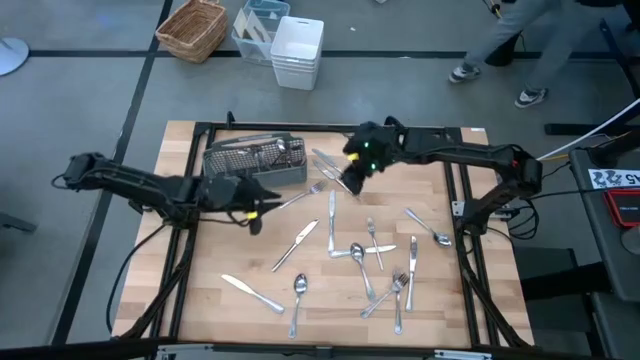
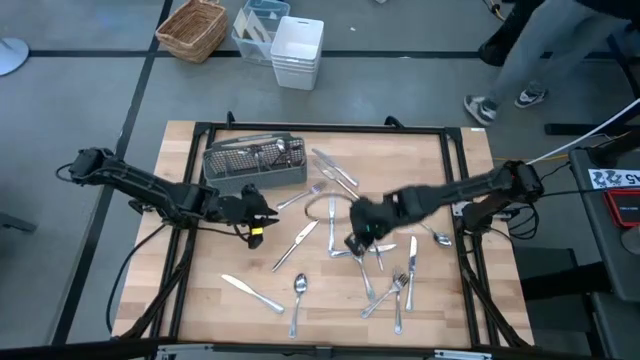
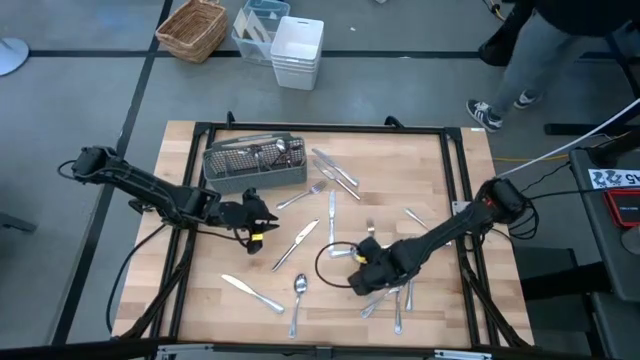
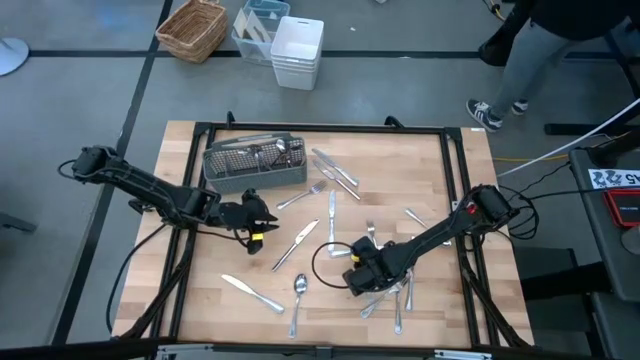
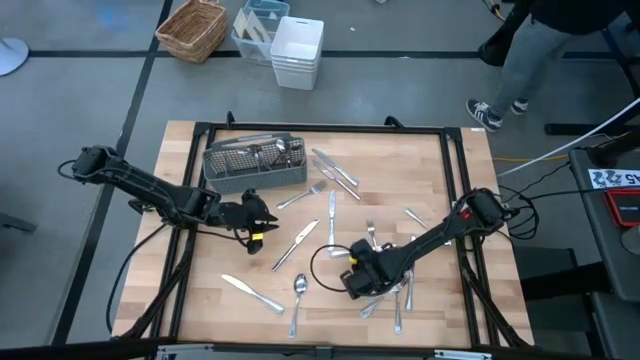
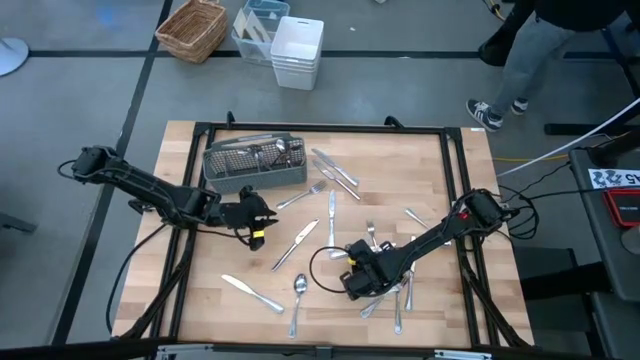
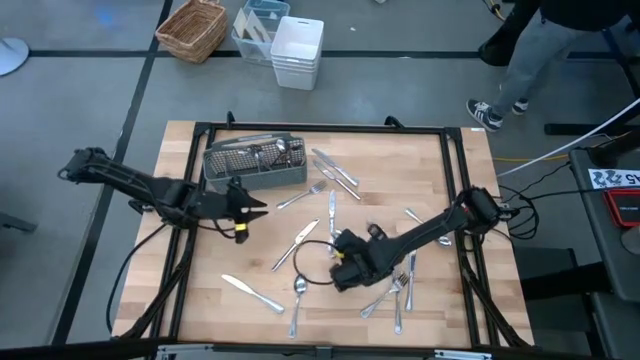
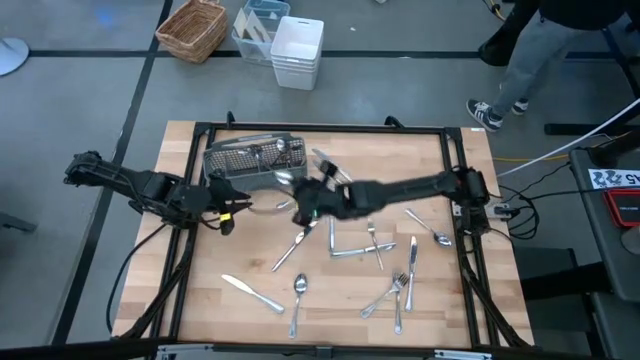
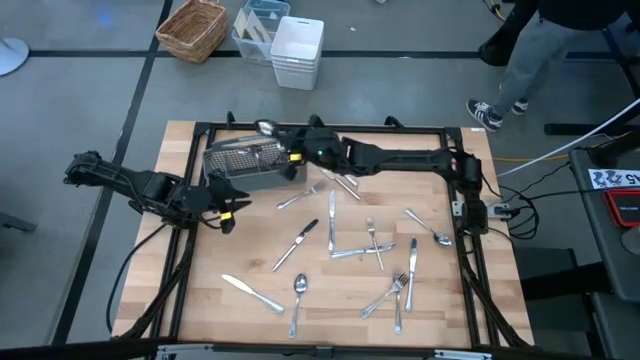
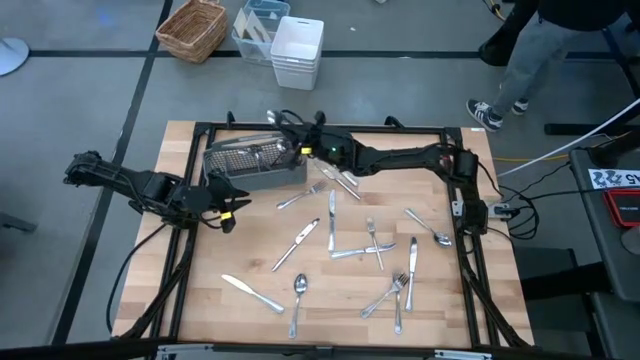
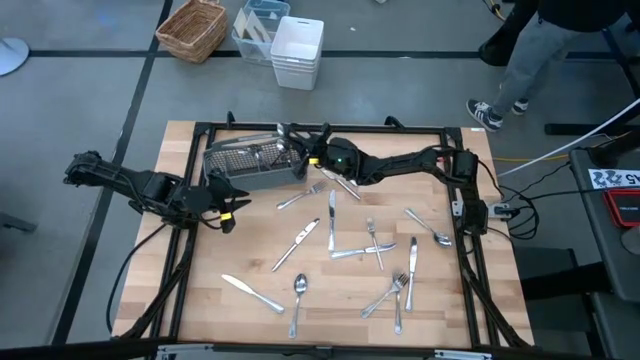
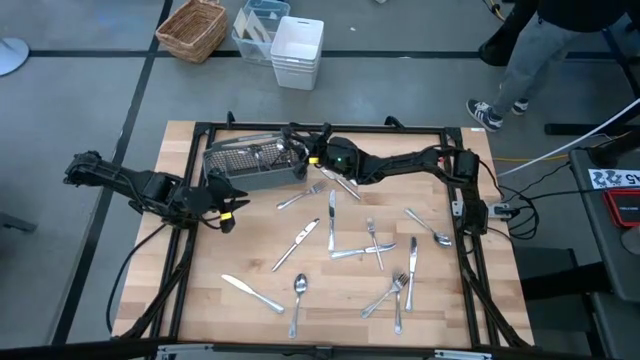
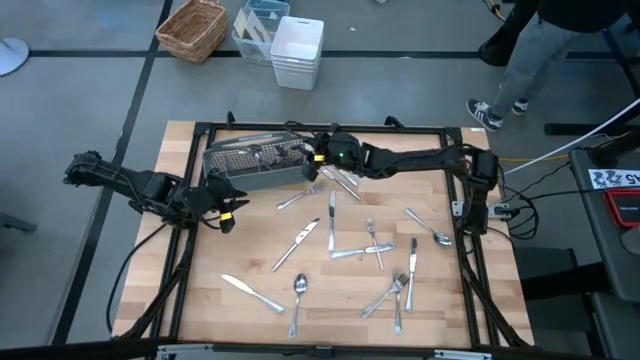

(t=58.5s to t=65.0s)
Task: Sort silverware
Put the silver spoon into the silverware rack

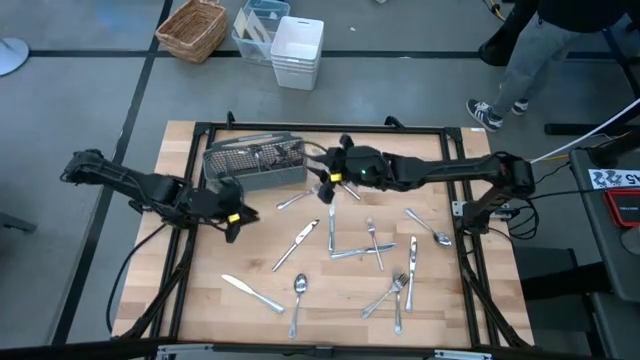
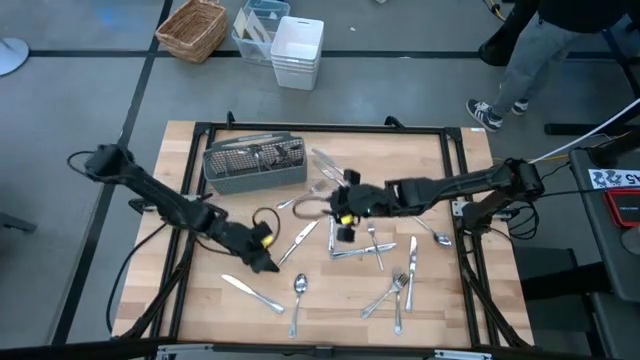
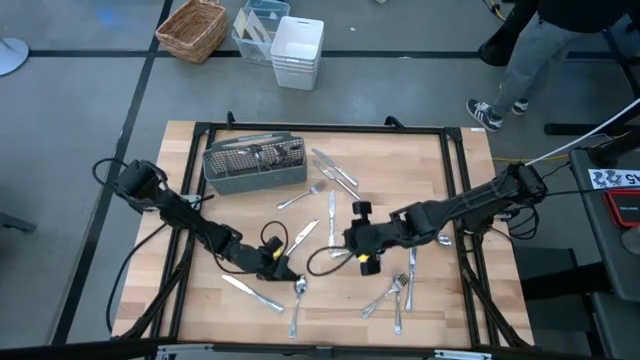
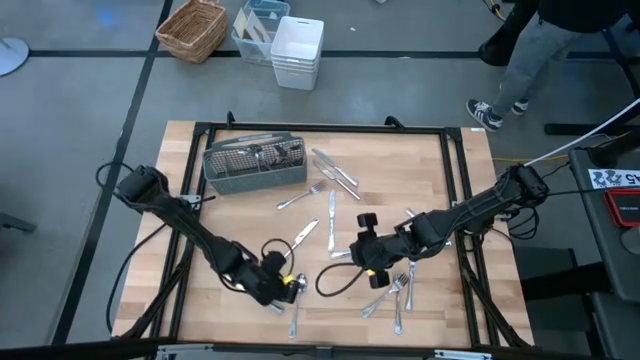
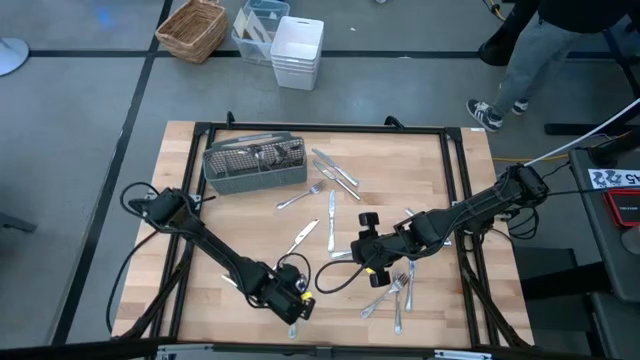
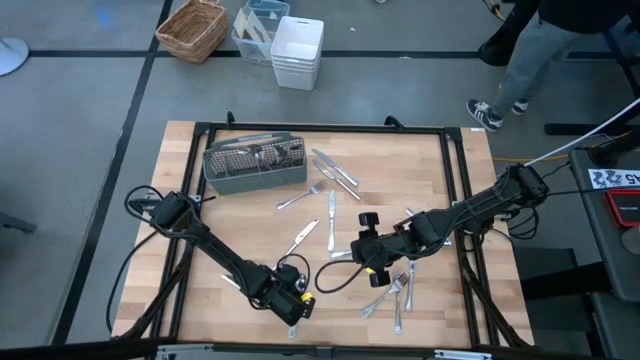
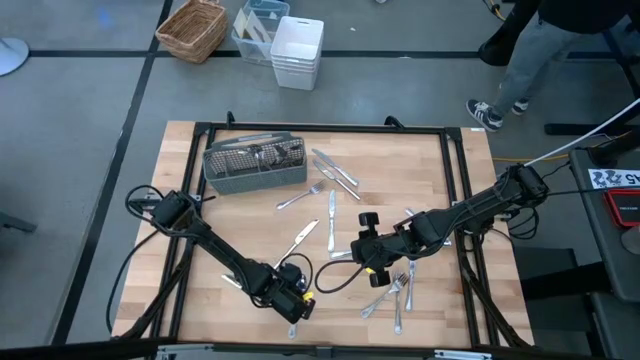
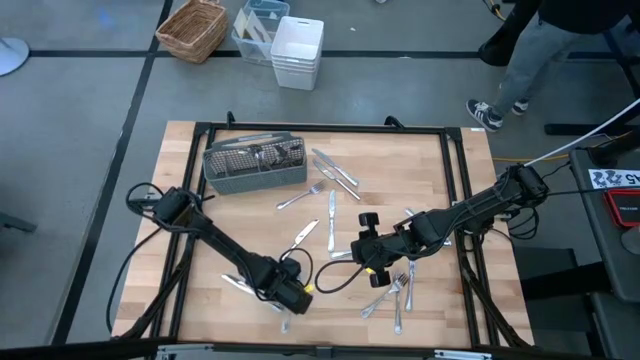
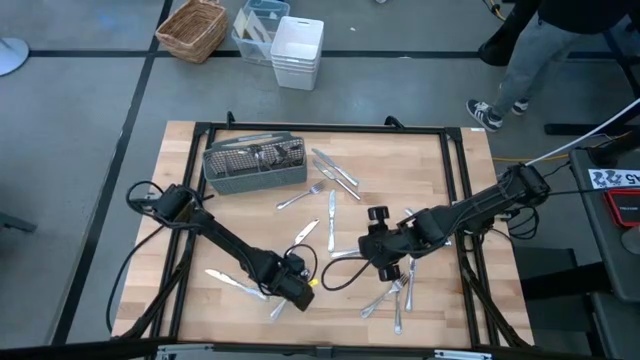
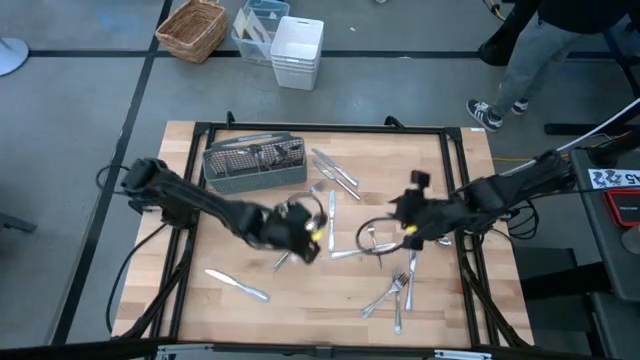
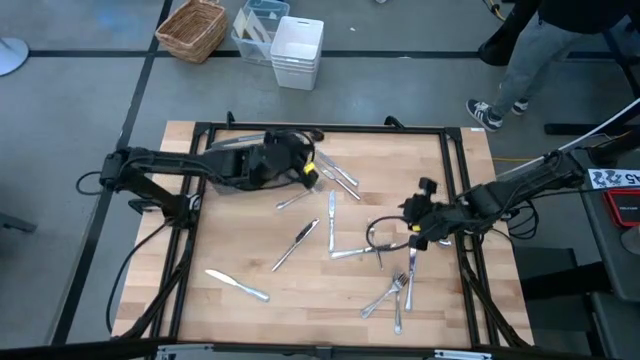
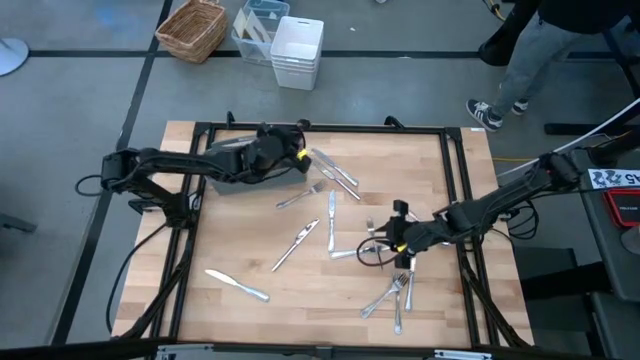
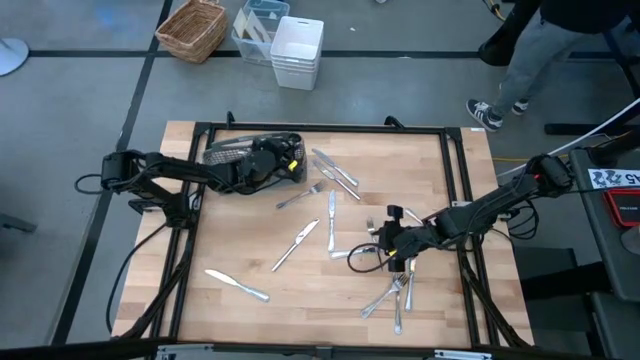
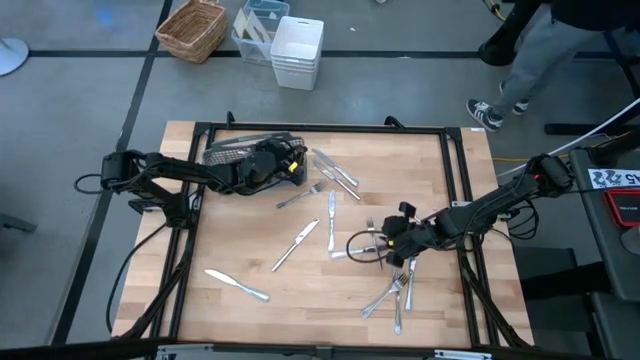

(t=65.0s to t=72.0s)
Put the silver spoon into the silverware rack

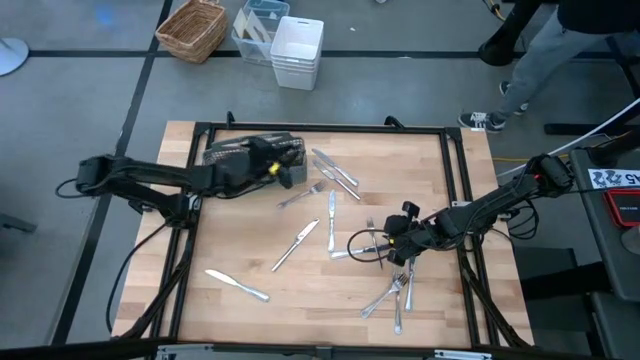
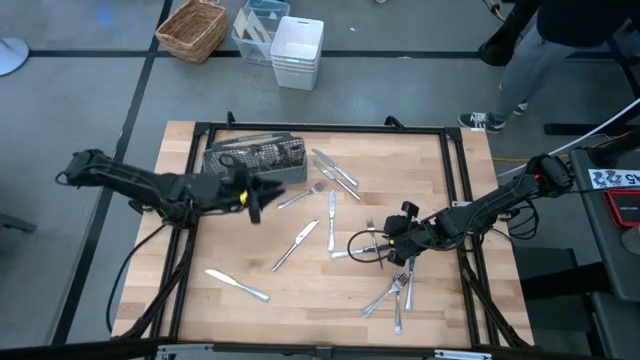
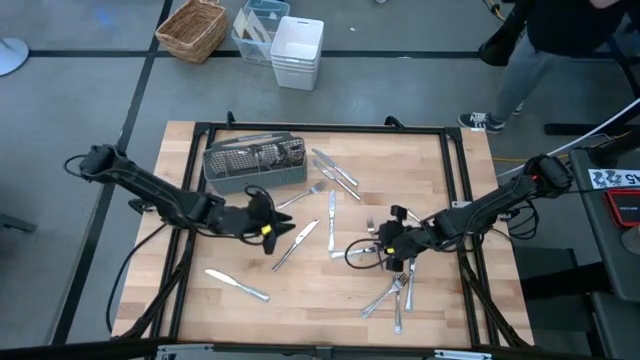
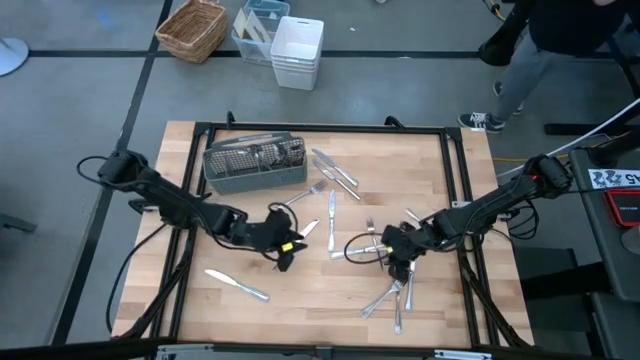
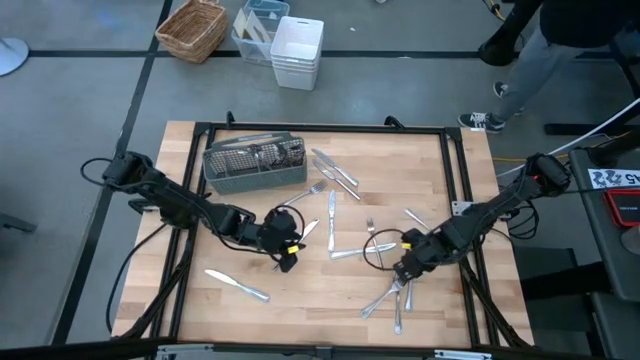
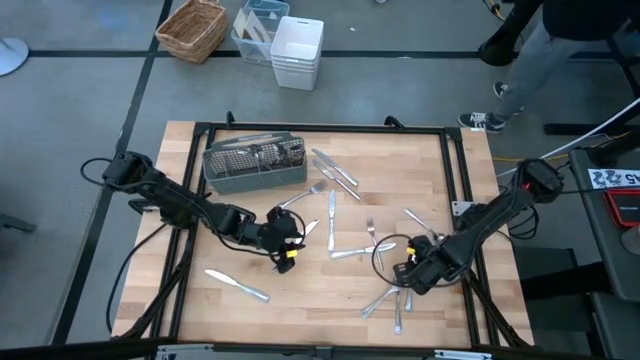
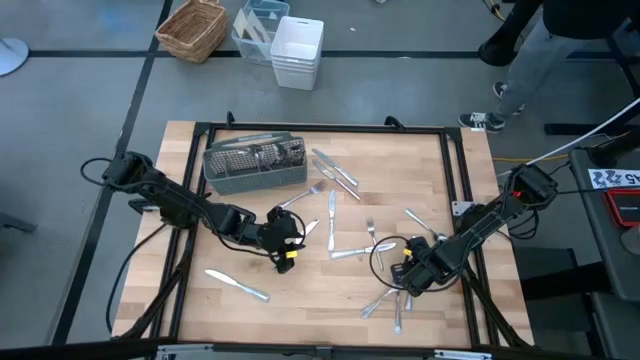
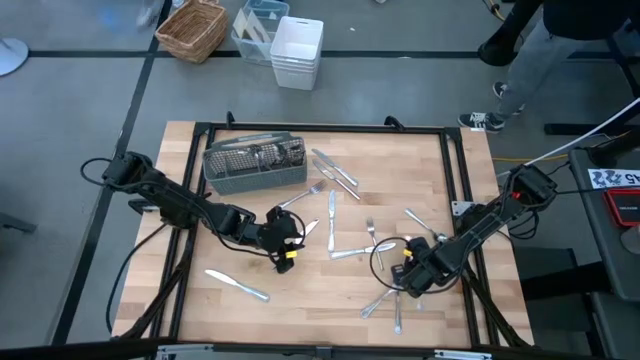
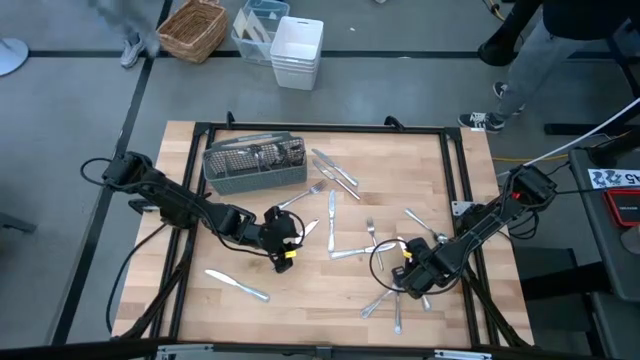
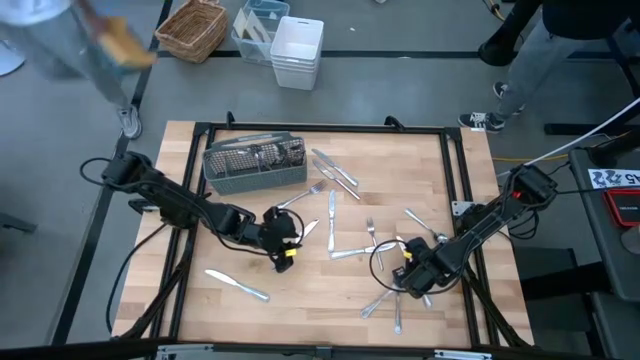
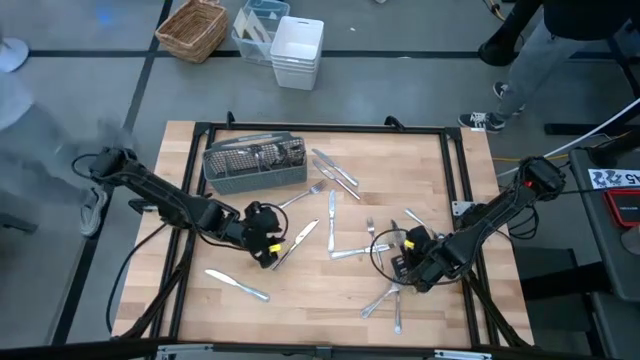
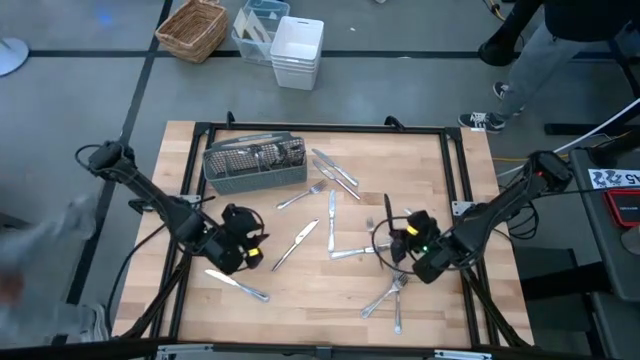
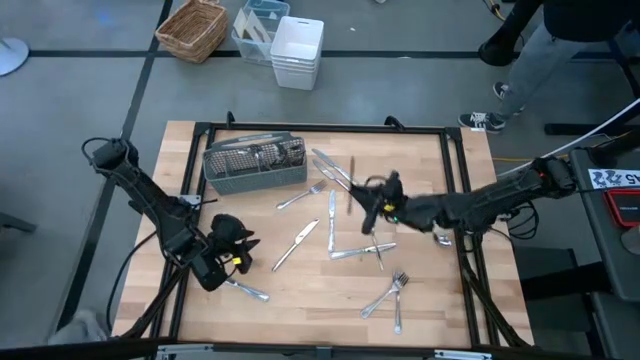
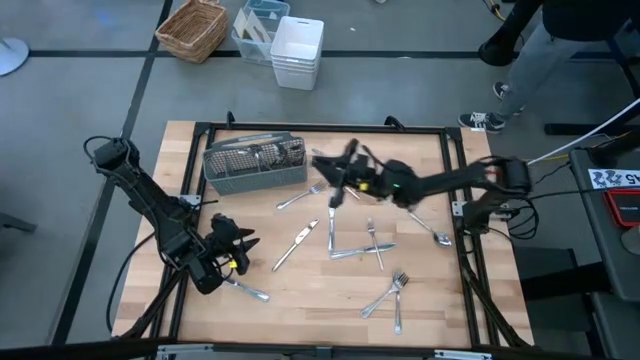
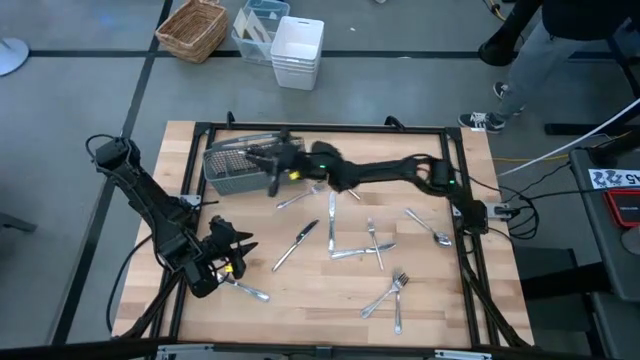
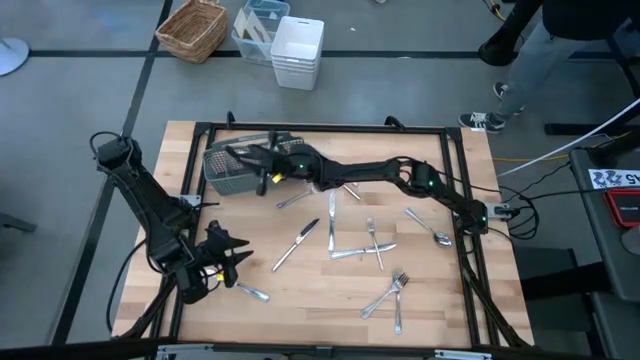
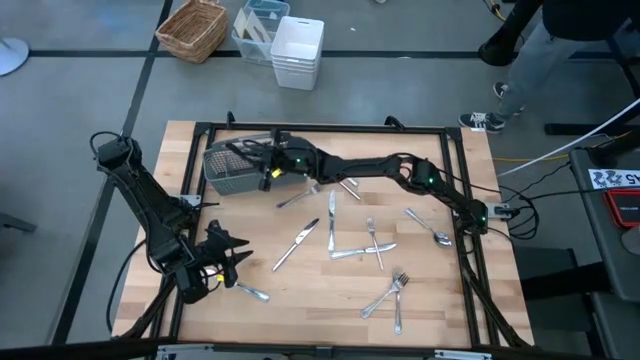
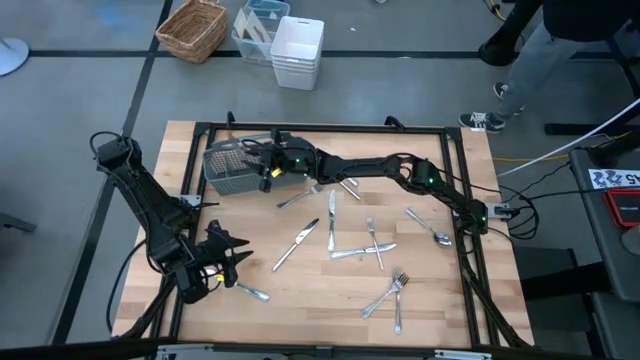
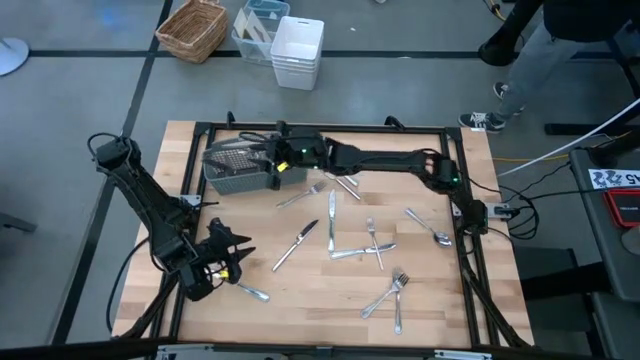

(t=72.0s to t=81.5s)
Put the silver table knife into the silverware rack
